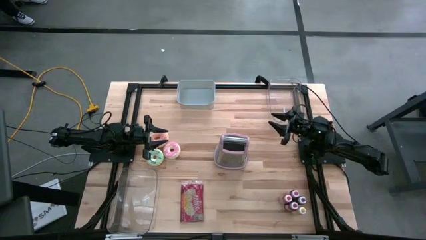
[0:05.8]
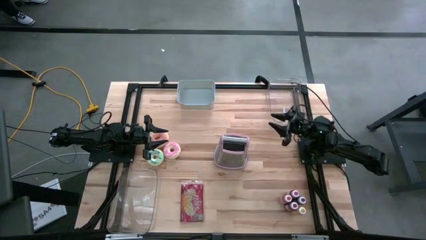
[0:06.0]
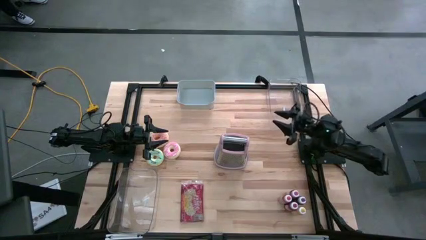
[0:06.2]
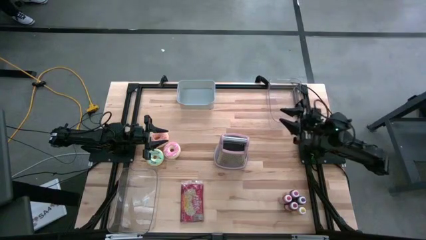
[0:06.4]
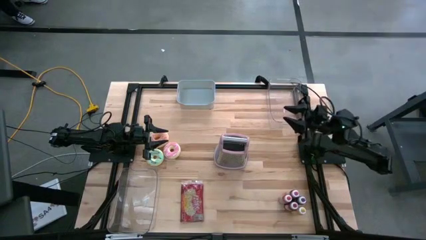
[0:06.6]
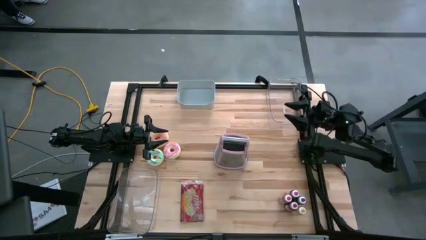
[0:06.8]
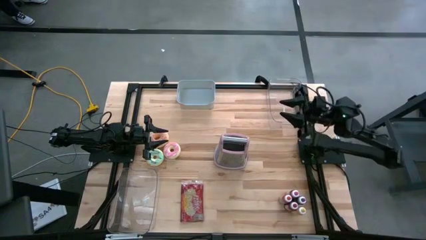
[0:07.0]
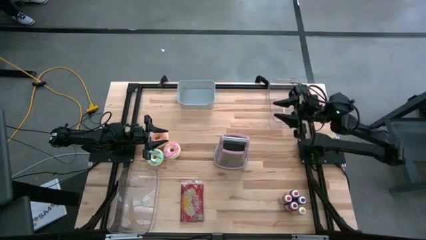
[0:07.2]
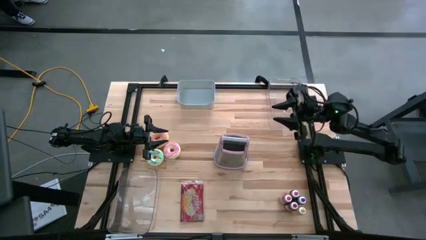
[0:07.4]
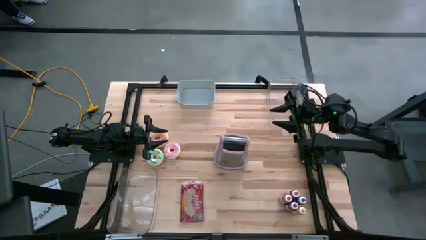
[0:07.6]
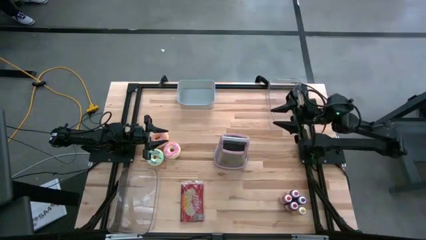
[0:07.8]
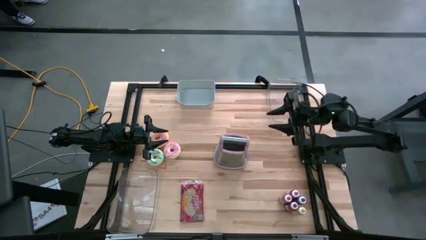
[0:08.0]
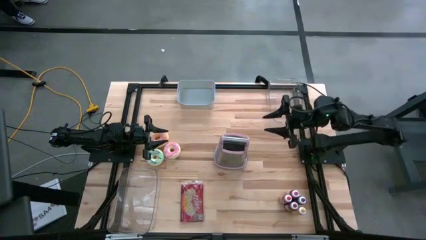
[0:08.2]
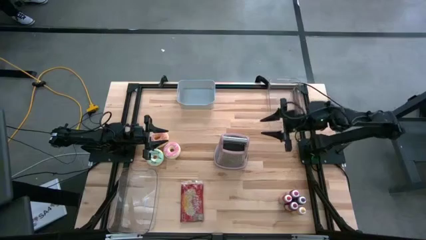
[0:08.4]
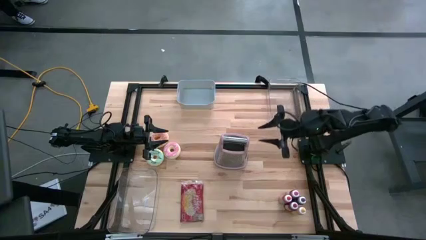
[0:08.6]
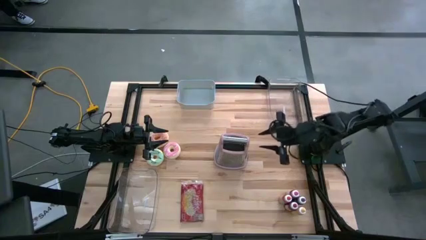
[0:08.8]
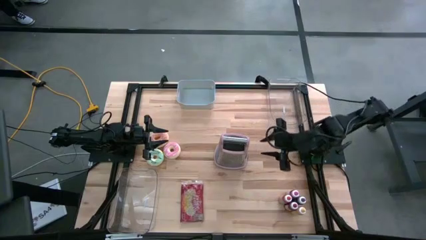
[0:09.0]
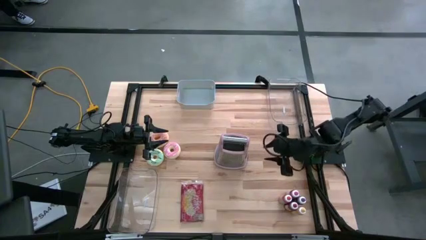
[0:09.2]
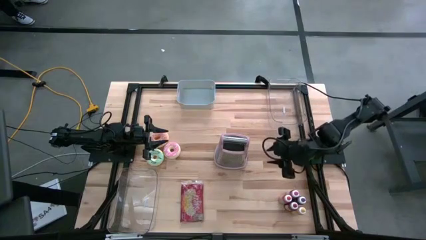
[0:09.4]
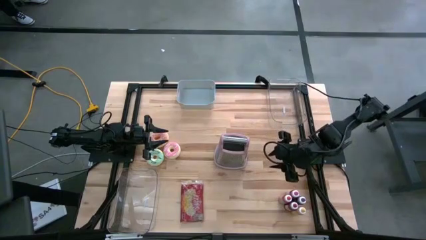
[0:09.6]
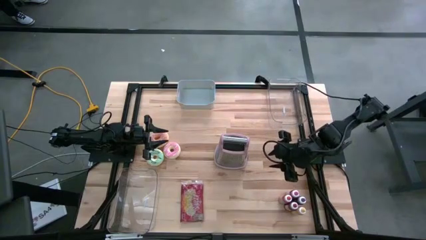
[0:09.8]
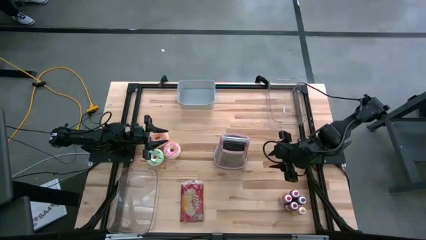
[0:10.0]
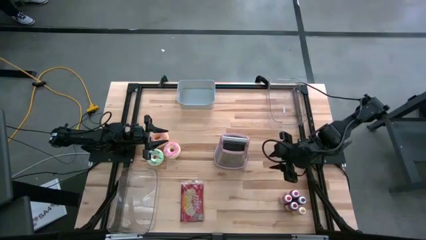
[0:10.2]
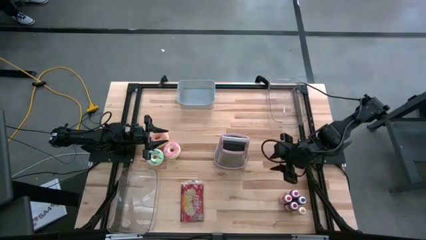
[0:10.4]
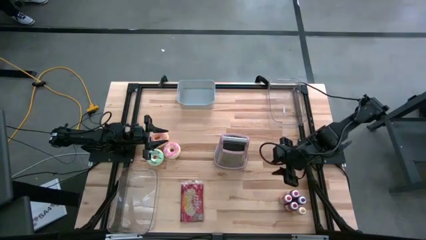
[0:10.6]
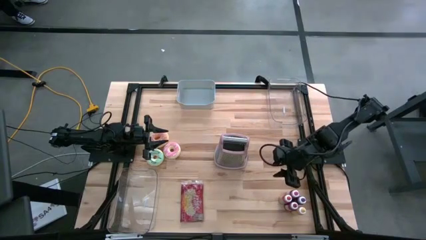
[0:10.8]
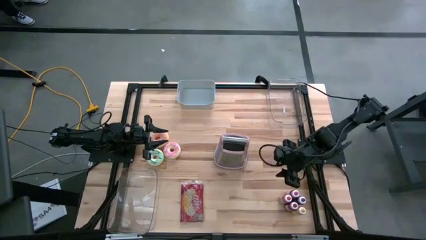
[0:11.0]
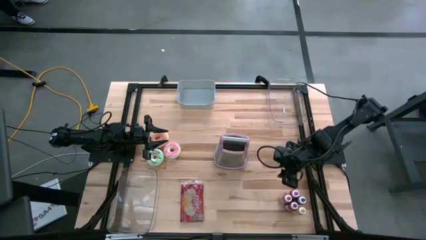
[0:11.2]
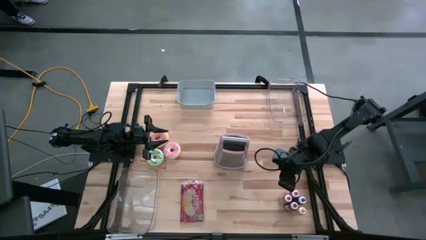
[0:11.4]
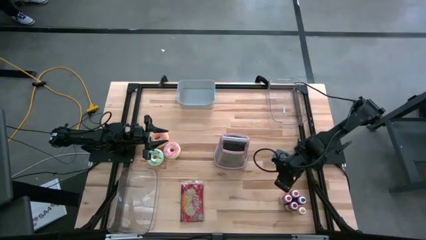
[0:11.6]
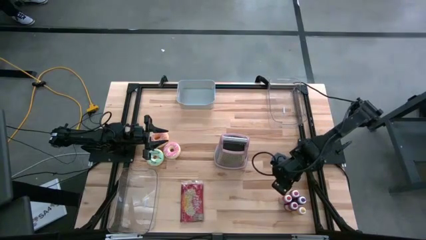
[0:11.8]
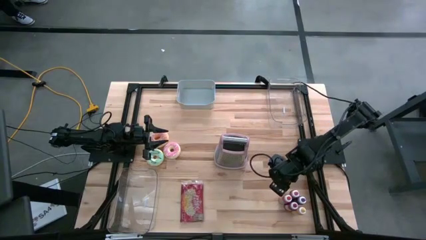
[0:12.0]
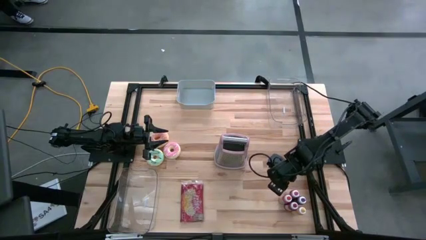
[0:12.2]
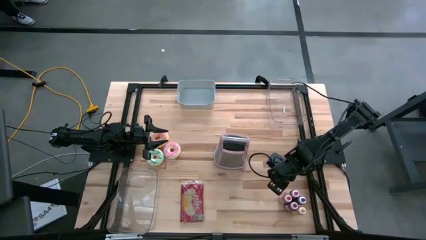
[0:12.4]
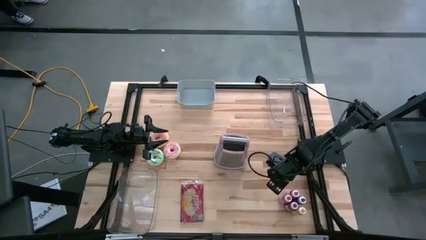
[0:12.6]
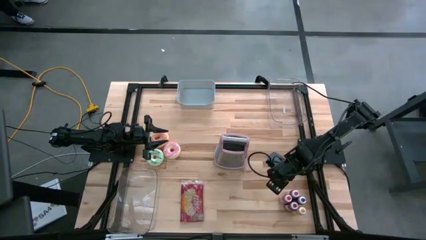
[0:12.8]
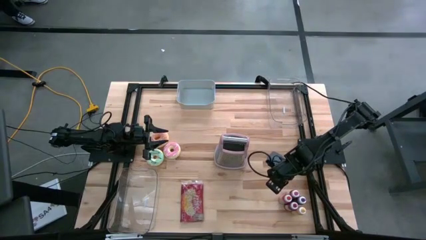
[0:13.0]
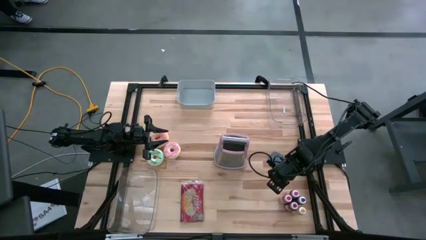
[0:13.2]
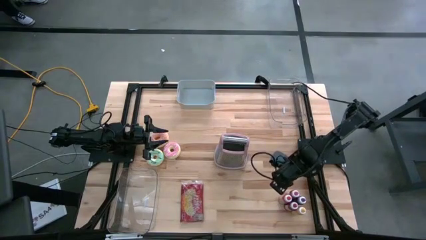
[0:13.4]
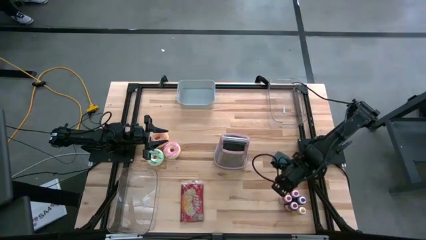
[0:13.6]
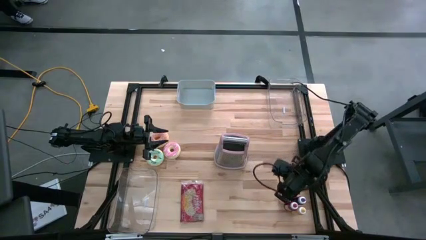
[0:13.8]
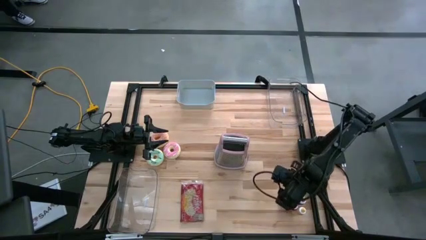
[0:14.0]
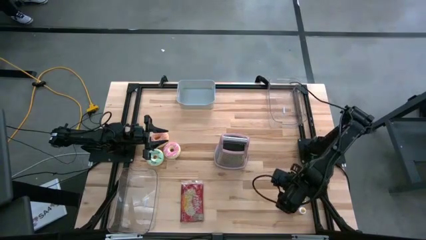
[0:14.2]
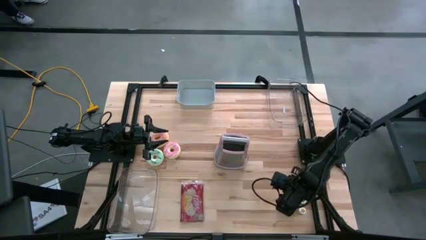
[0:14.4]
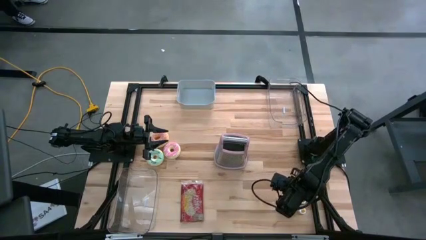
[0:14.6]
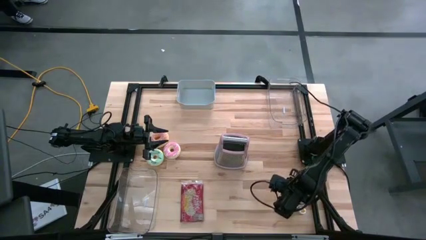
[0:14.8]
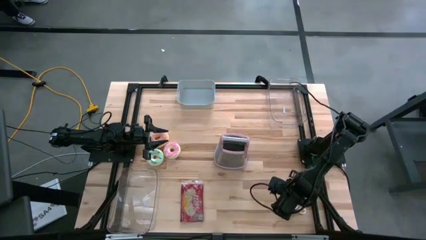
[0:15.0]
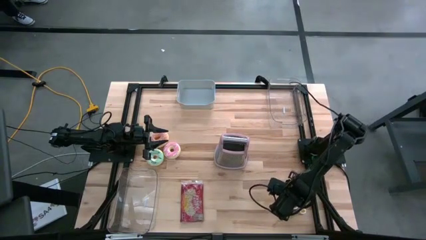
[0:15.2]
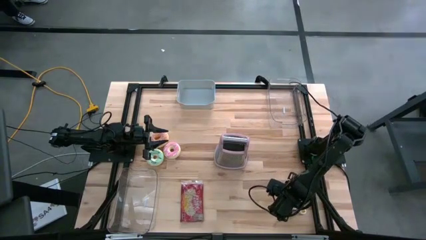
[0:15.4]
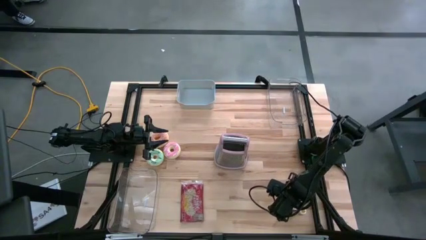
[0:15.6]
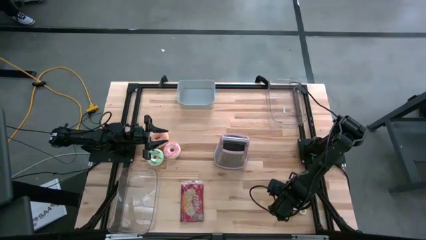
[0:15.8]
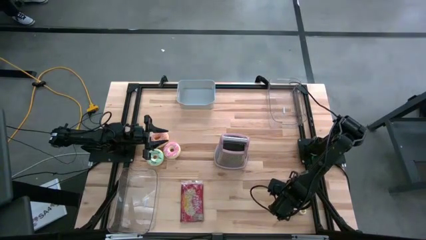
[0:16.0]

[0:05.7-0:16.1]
Put the orange food coloring into the right transparent bin

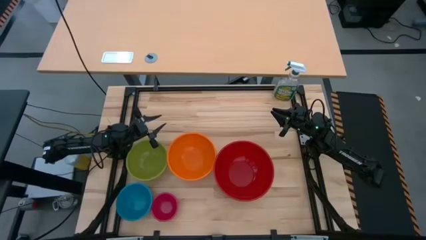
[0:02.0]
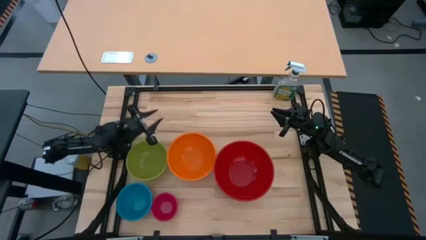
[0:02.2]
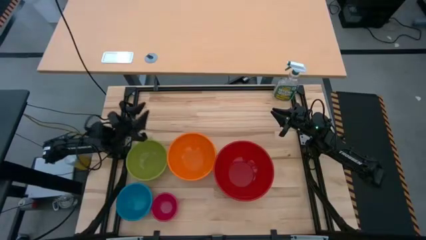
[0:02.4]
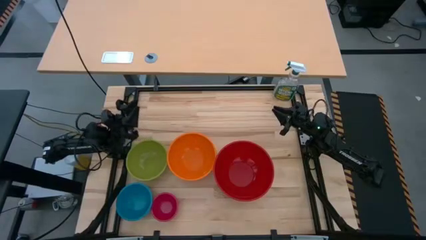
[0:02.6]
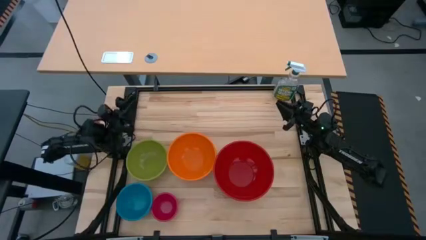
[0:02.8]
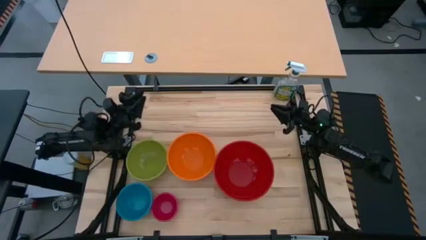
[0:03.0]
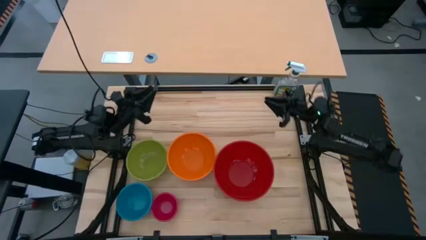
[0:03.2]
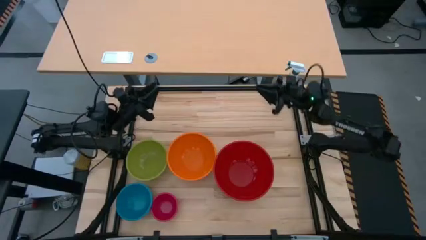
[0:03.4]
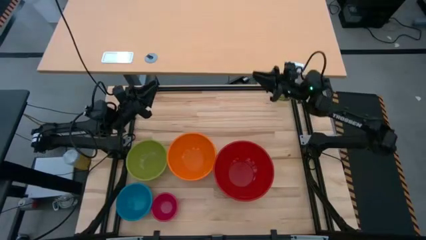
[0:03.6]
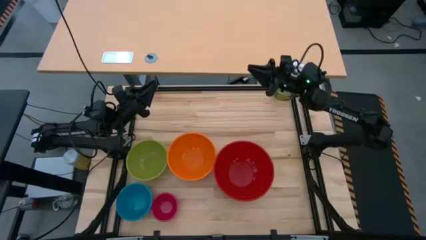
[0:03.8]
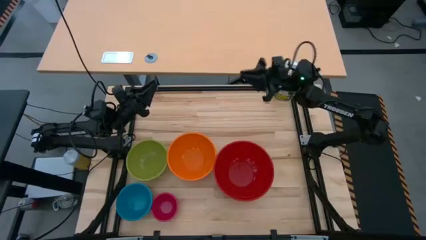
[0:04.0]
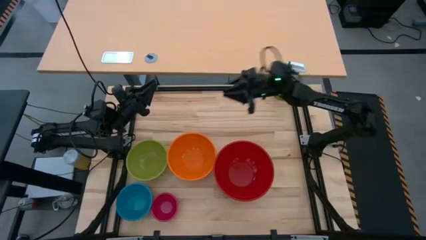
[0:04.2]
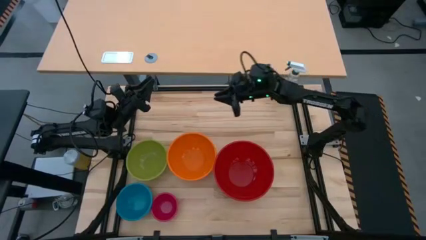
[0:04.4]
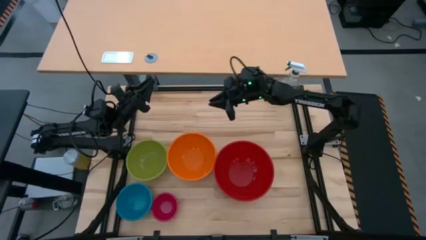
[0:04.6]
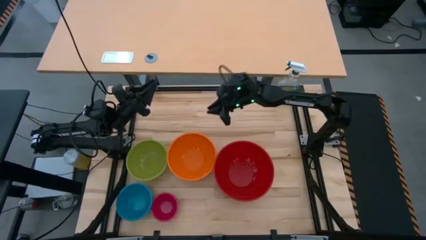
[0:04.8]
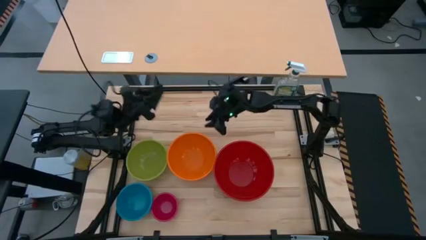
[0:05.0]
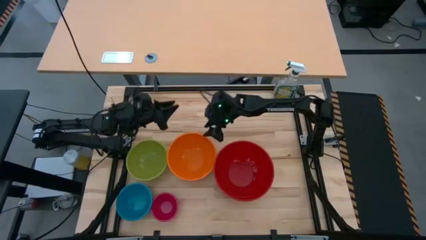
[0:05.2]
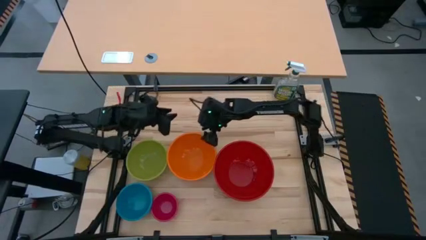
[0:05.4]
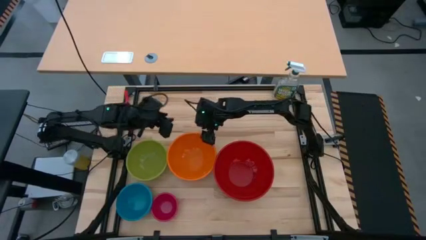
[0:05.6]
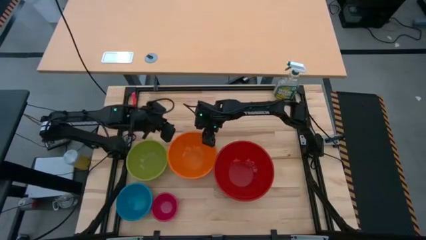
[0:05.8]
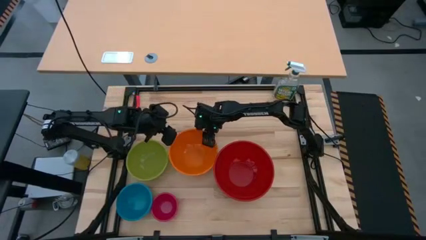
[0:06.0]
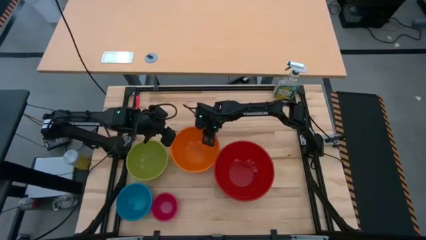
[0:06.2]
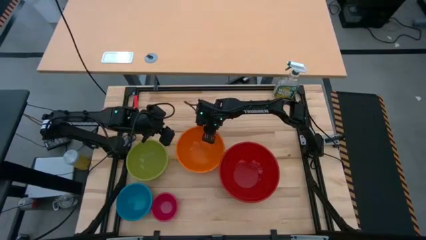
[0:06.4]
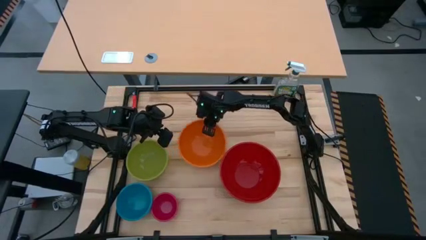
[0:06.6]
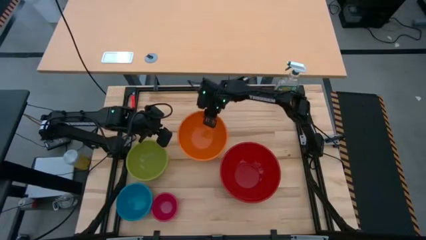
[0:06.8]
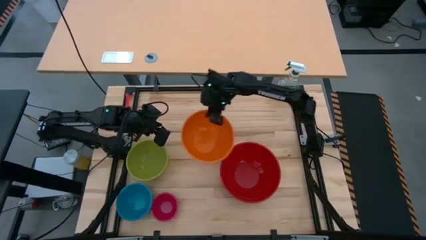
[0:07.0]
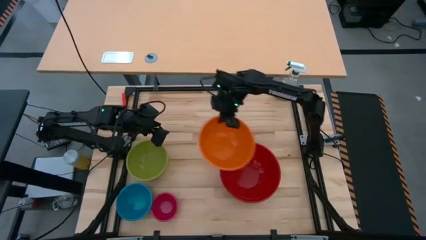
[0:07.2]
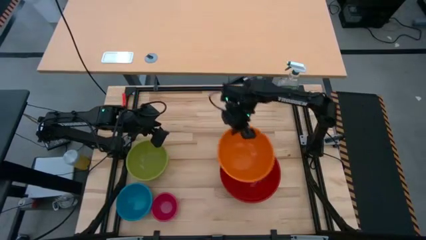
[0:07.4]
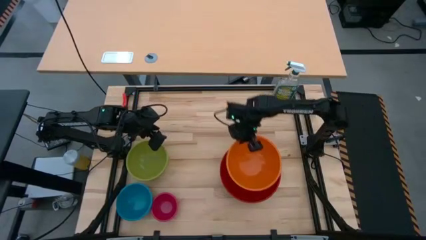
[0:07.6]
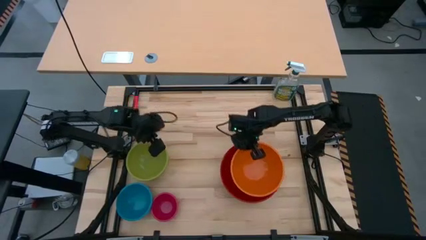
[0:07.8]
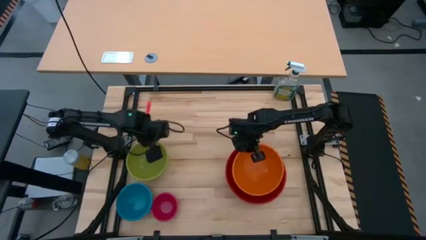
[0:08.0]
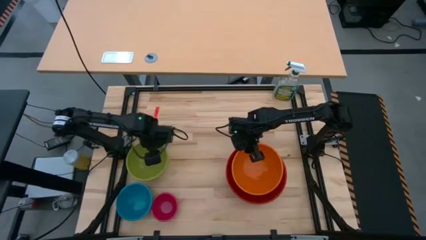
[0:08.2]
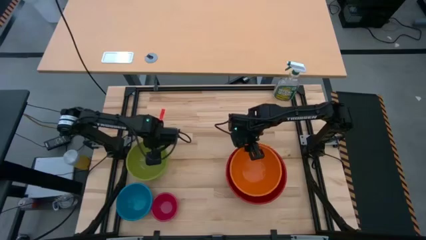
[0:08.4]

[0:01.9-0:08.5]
Stack the orange bowl into the red bowl
